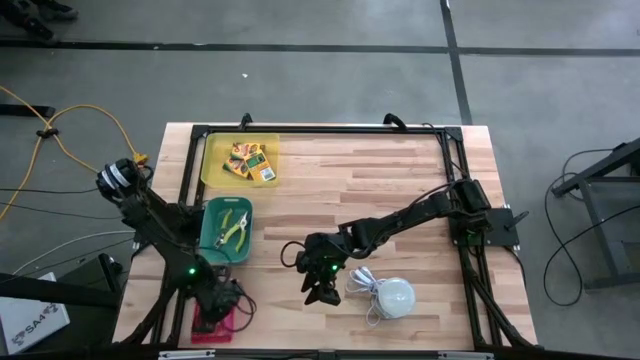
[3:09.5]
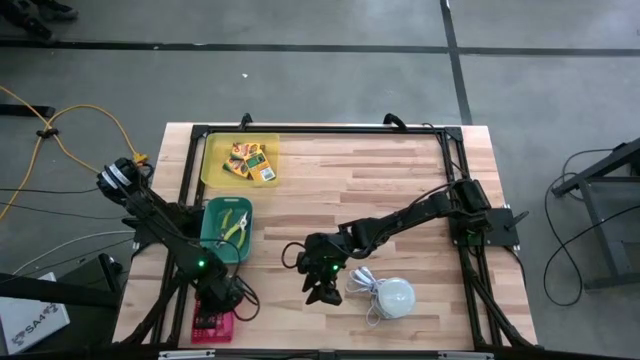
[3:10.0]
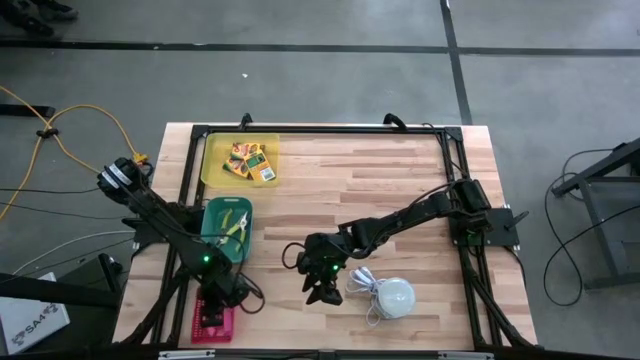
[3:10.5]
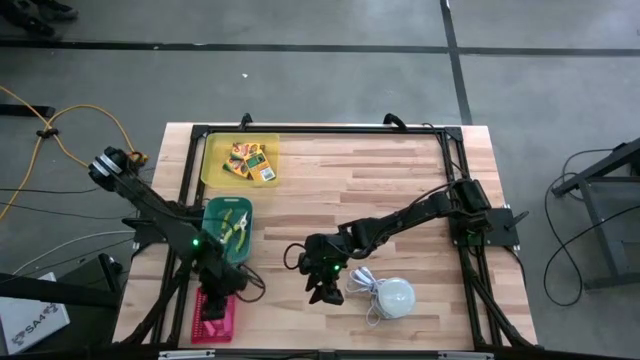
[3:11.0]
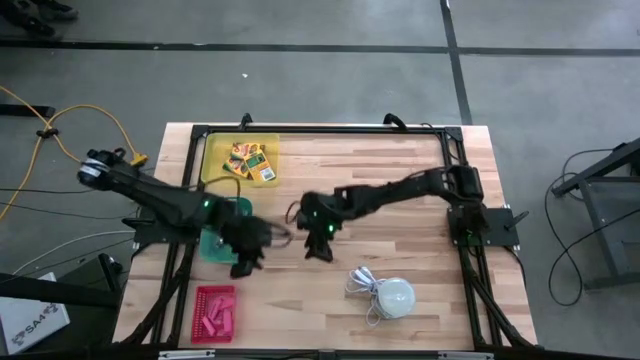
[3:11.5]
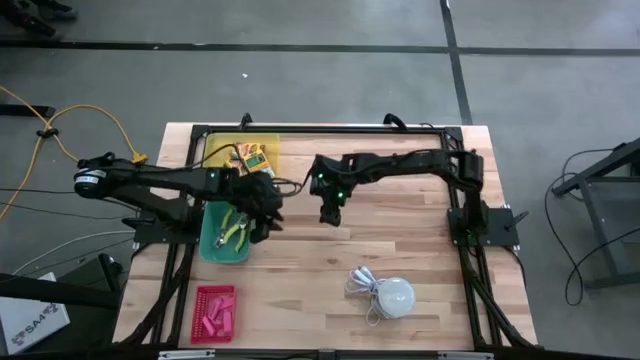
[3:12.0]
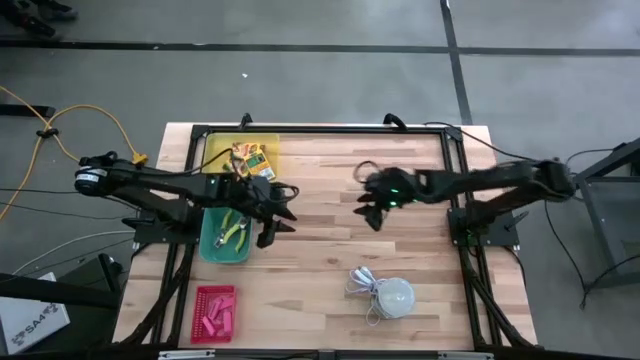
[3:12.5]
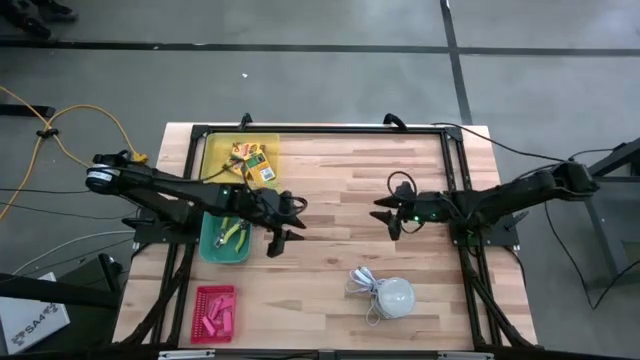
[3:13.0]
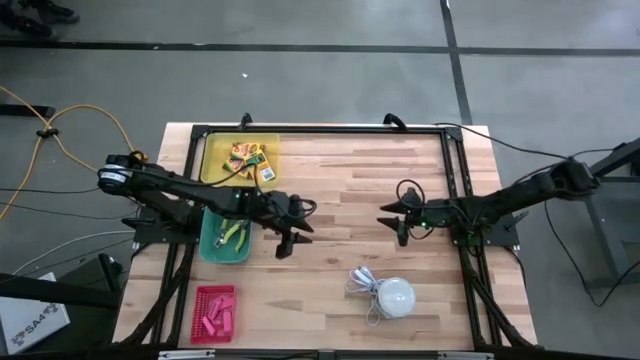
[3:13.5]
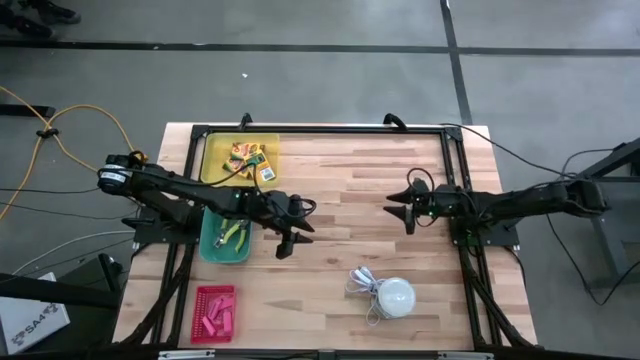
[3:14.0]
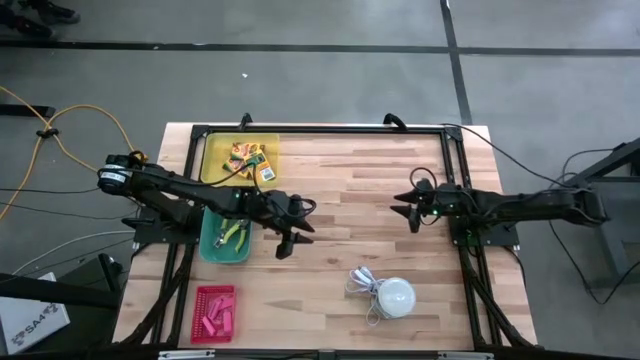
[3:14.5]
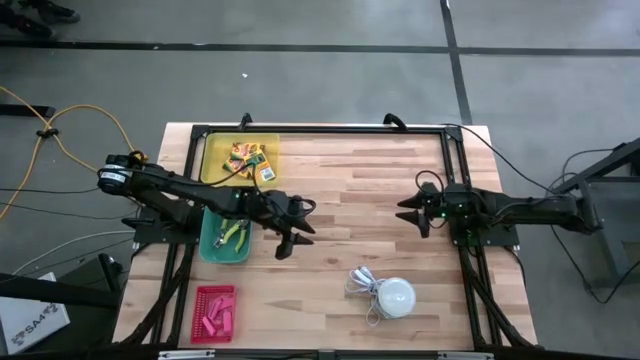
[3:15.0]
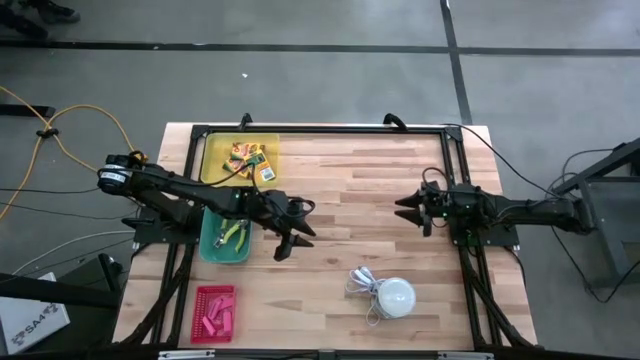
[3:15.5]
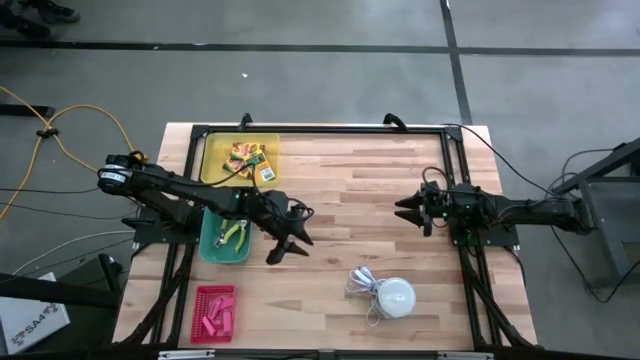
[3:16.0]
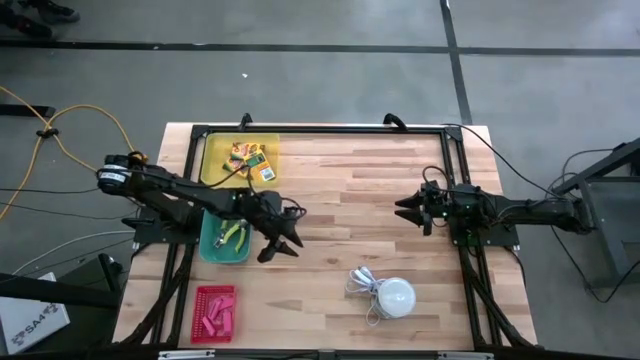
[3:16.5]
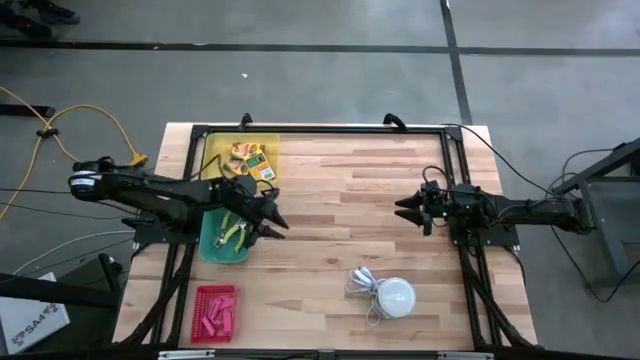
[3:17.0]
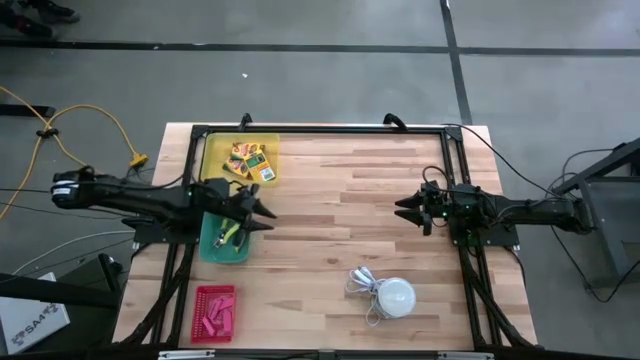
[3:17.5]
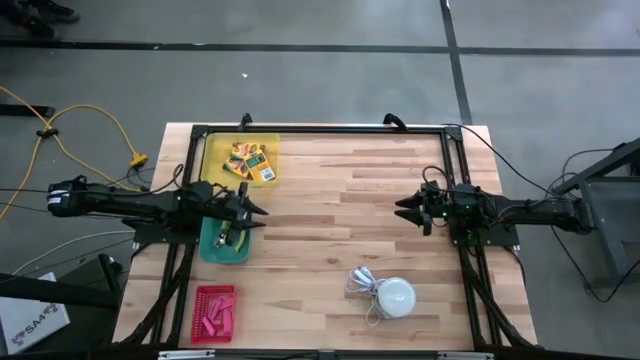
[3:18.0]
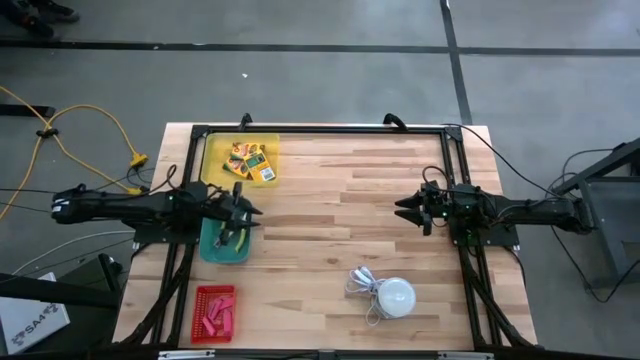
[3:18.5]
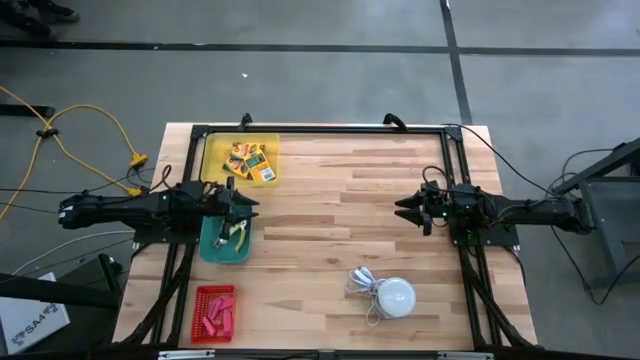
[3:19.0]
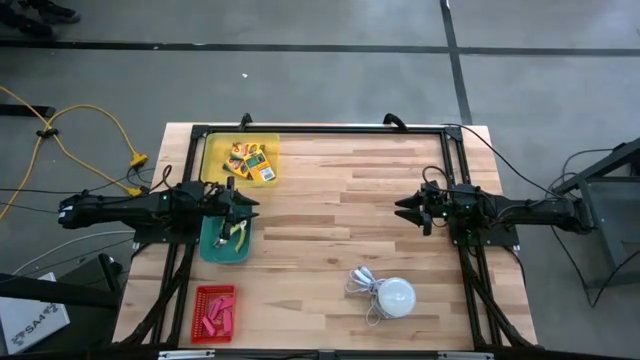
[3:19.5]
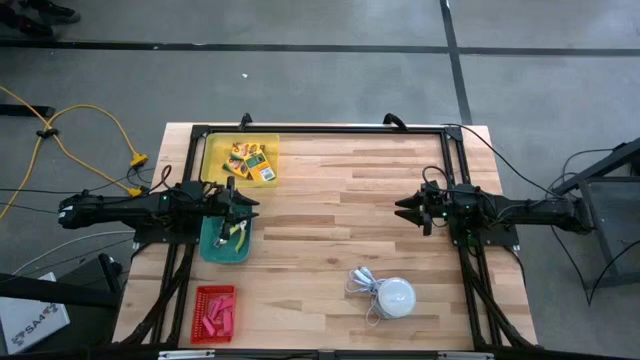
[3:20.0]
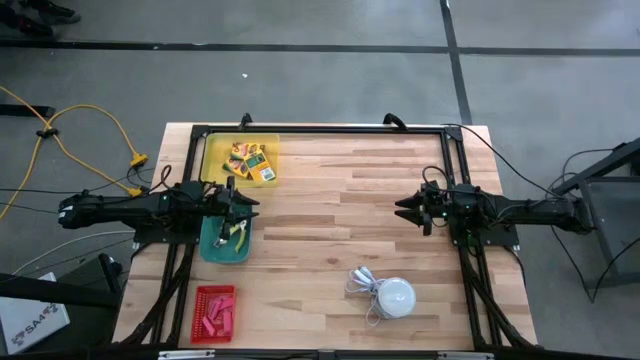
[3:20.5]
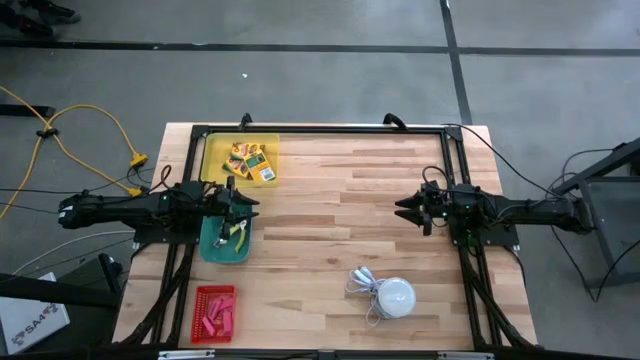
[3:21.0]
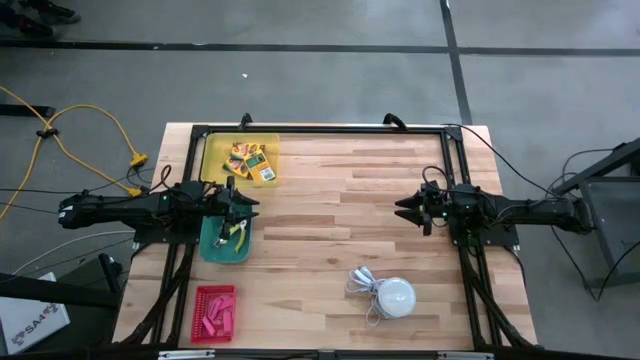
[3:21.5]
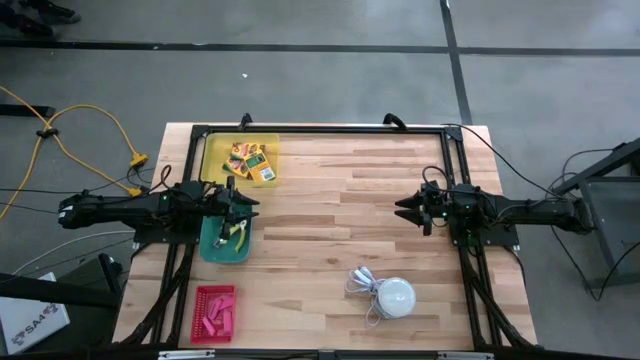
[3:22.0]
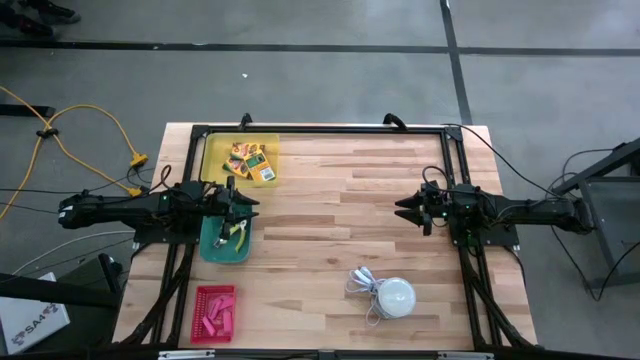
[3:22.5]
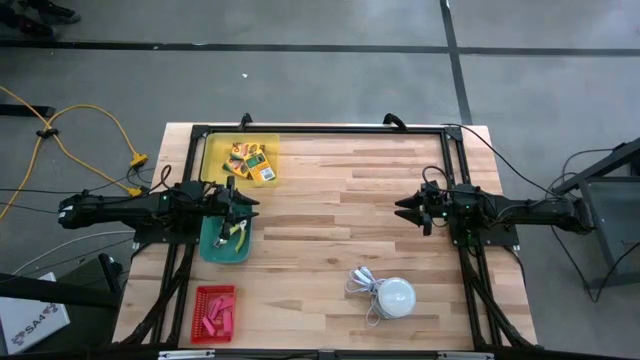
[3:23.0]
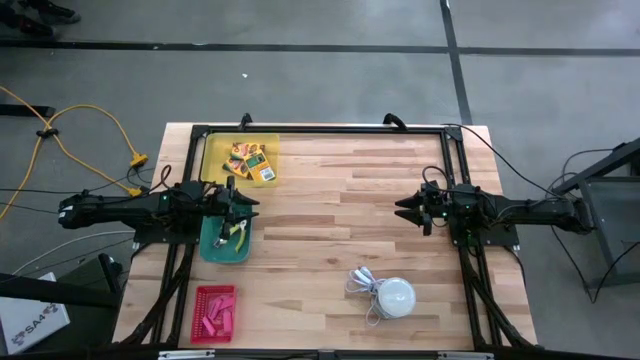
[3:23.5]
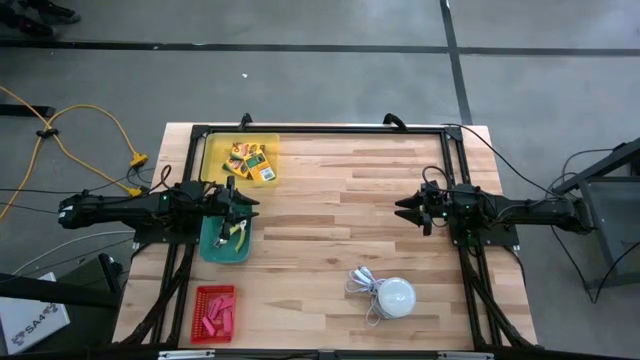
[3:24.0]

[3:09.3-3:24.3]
Task: Pick & Place School Supplies
Return to Home Position

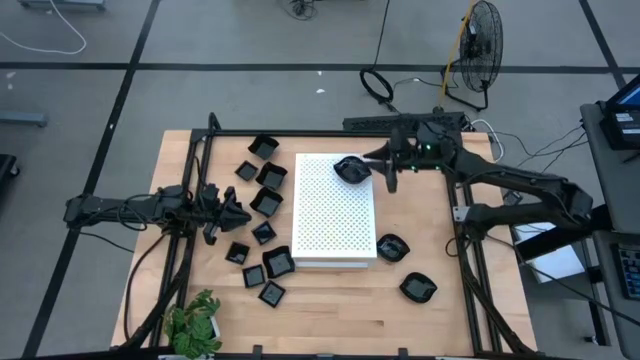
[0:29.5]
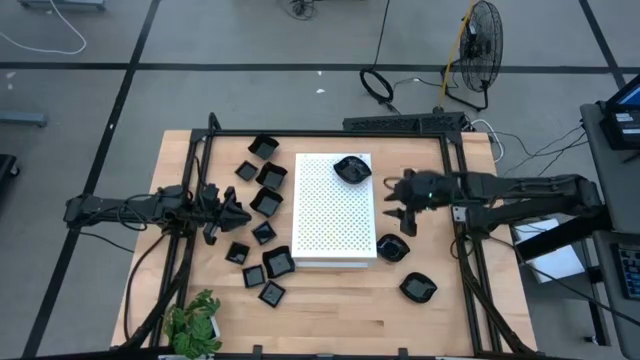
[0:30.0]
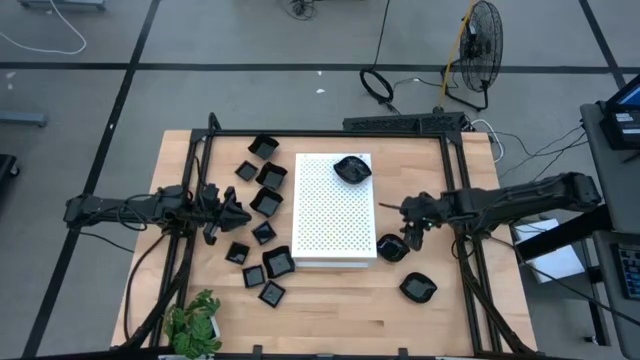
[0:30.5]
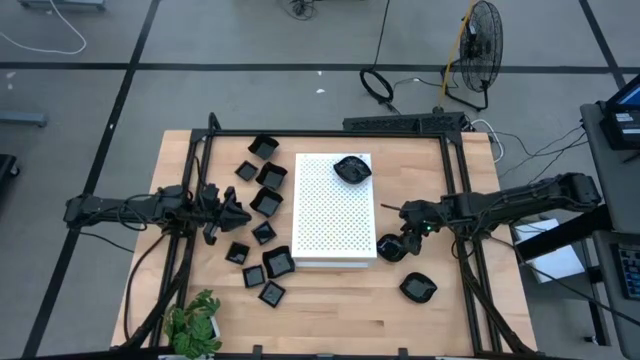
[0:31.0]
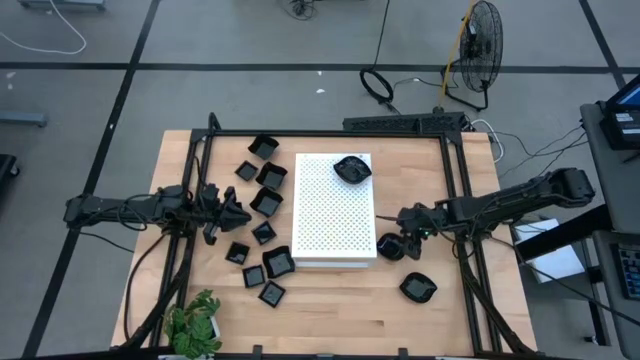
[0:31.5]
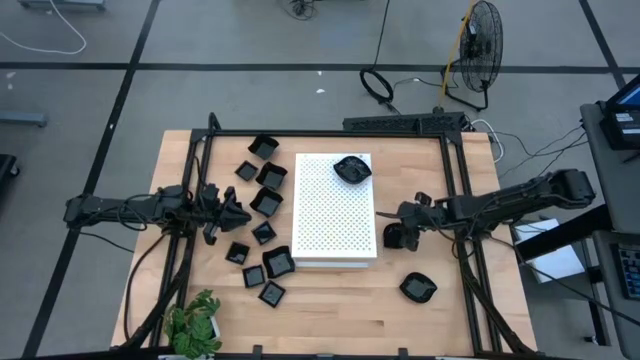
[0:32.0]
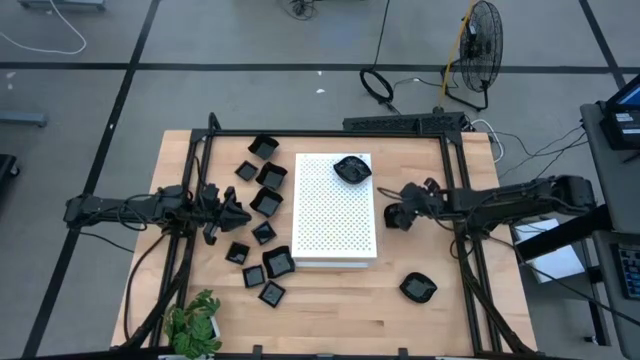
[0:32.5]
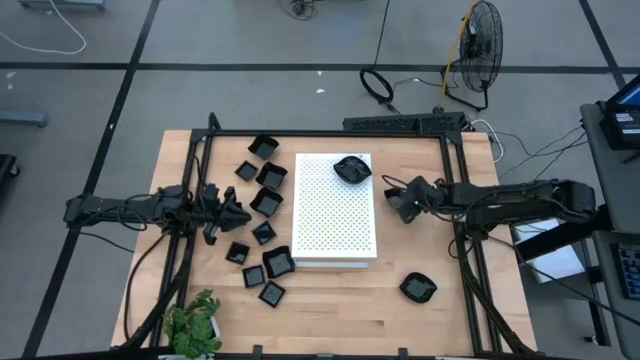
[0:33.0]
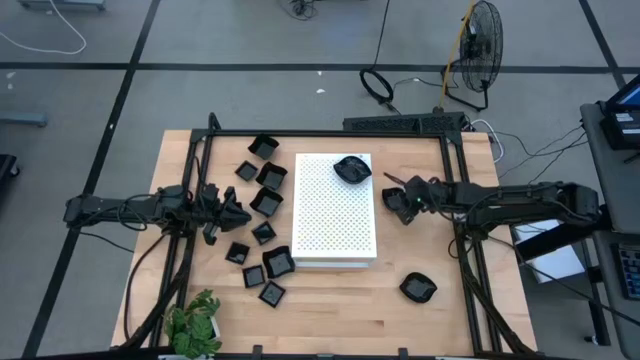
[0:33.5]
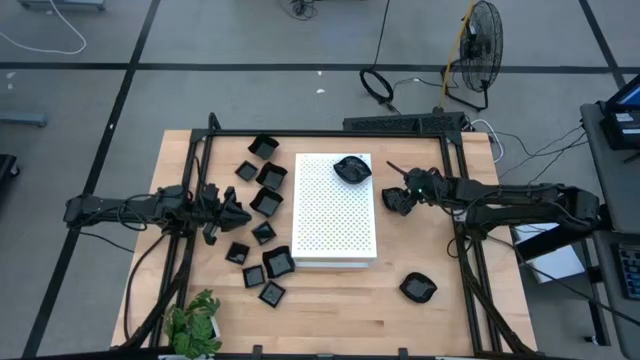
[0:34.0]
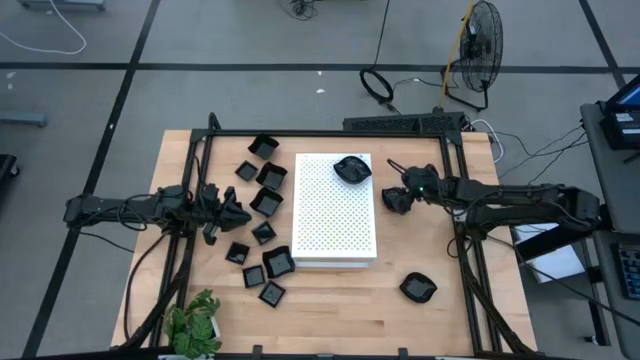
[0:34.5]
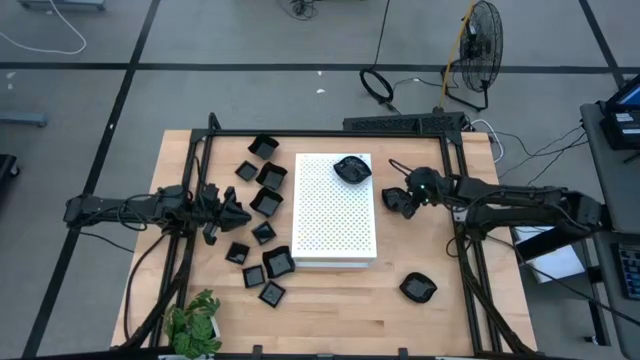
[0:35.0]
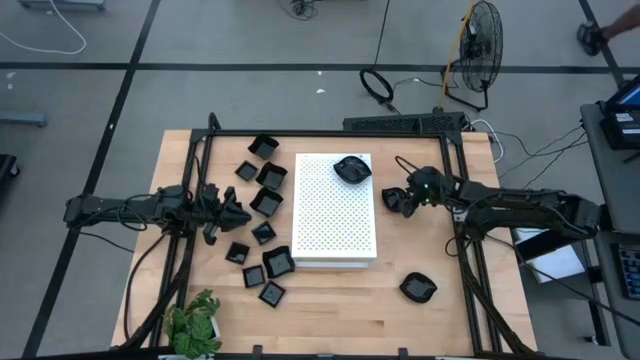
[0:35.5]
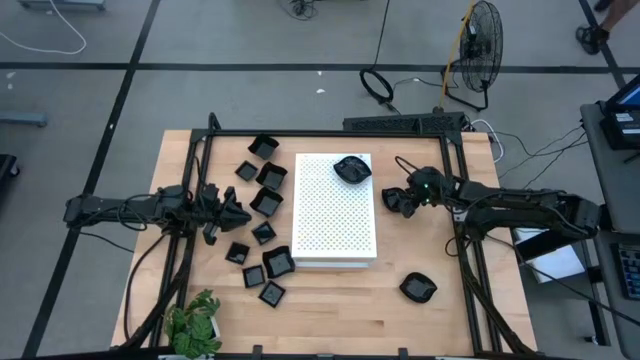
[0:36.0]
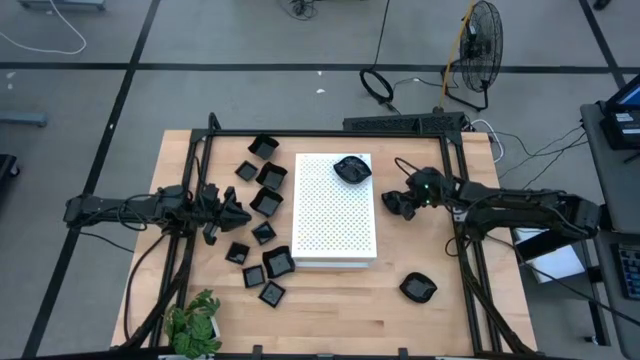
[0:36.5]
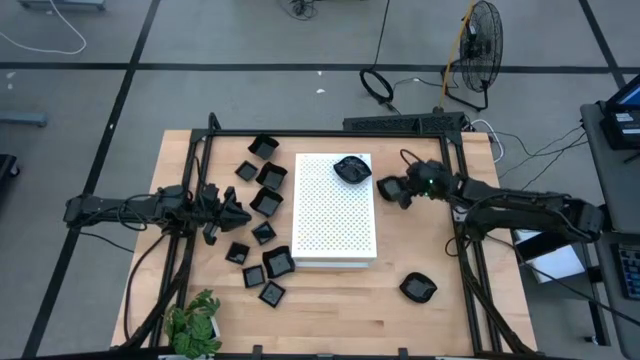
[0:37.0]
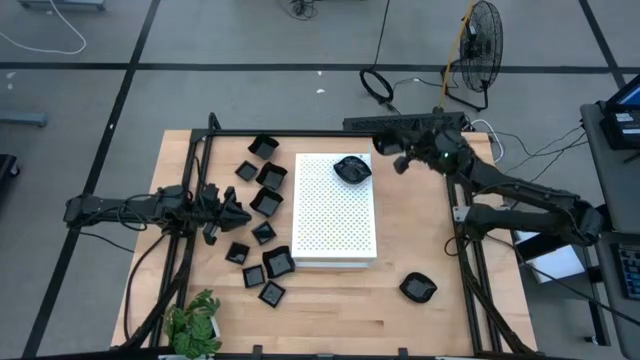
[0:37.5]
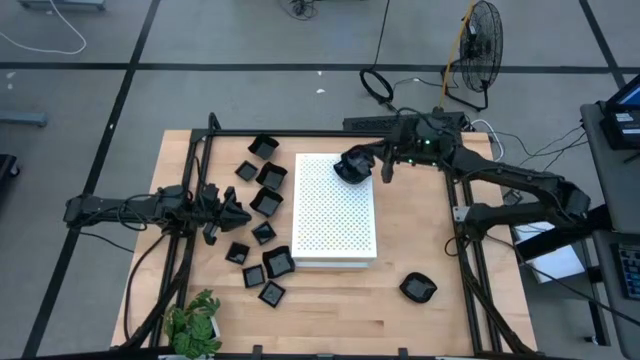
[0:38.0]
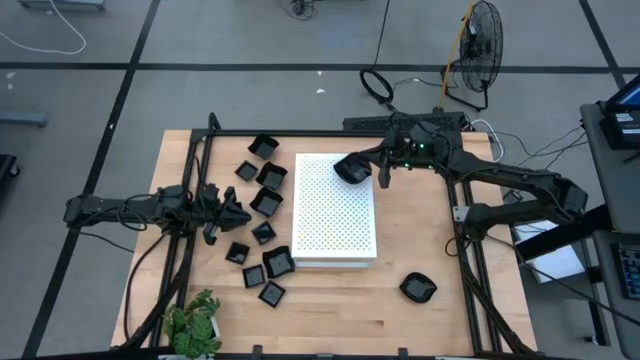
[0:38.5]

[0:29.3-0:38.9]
Task: Pick & Place Mini shaped plates
Stack the black leaf shaped plate on top of the other black leaf shaped plates on the shelf
